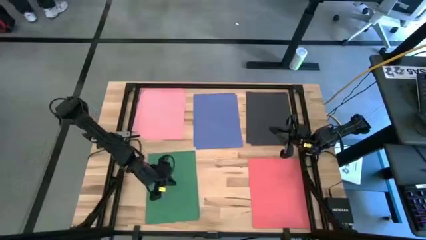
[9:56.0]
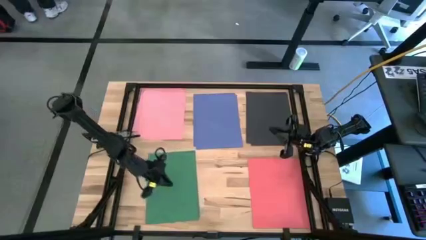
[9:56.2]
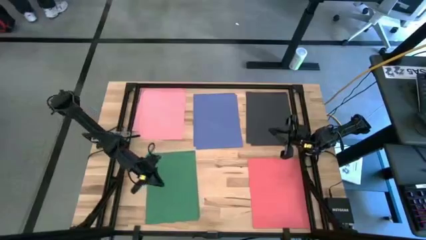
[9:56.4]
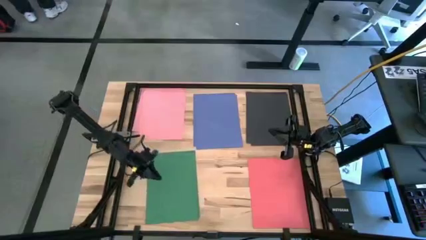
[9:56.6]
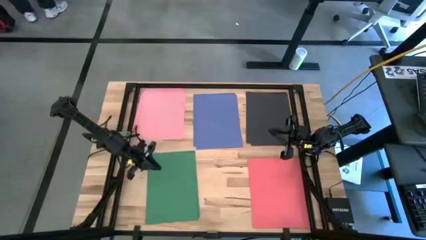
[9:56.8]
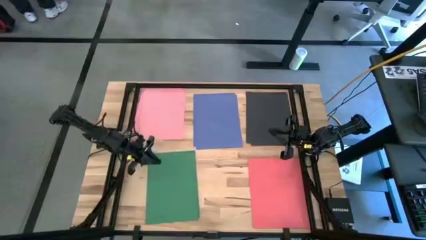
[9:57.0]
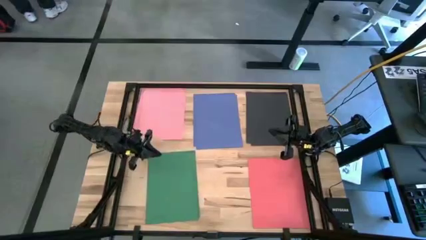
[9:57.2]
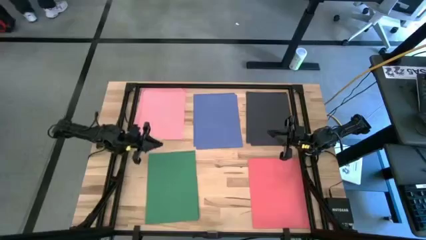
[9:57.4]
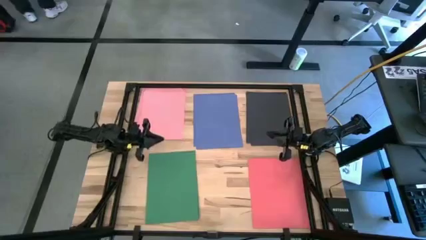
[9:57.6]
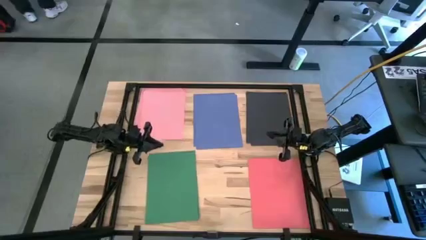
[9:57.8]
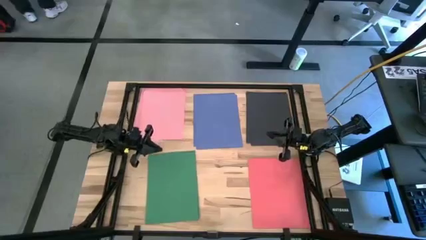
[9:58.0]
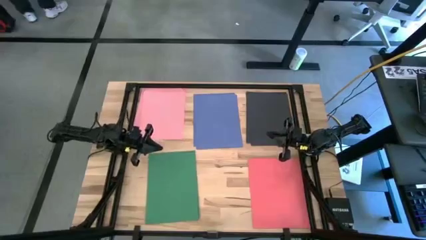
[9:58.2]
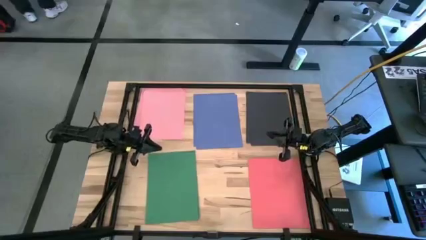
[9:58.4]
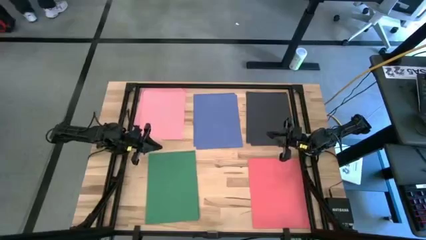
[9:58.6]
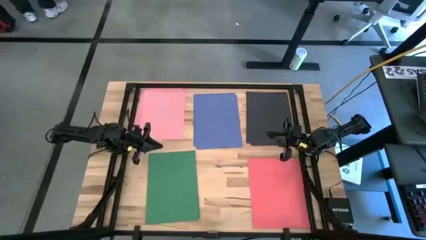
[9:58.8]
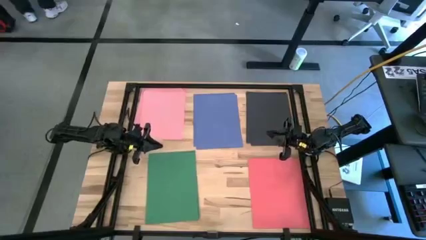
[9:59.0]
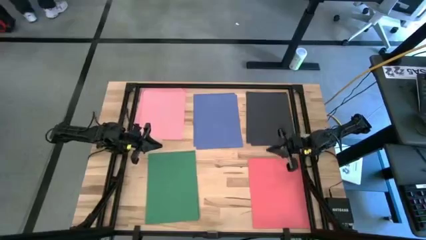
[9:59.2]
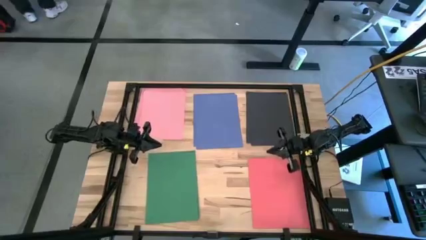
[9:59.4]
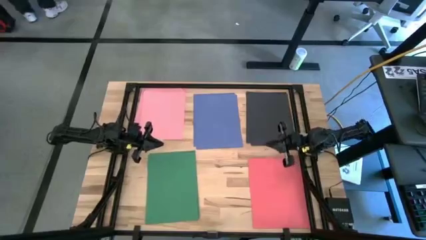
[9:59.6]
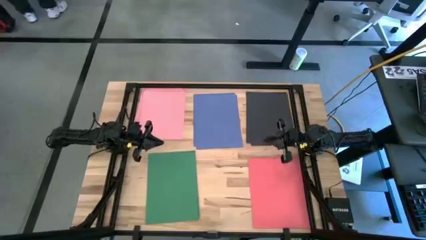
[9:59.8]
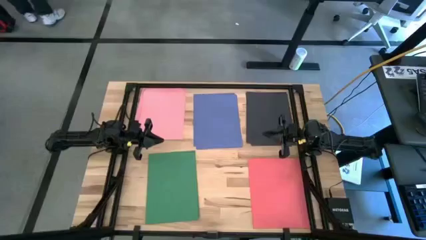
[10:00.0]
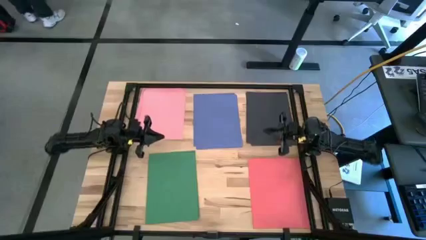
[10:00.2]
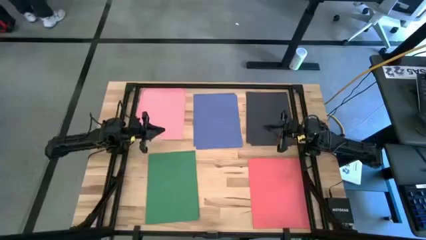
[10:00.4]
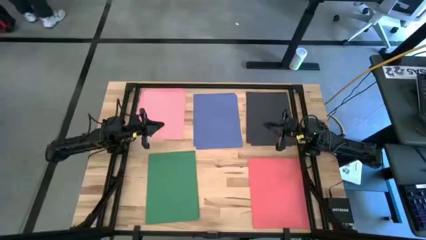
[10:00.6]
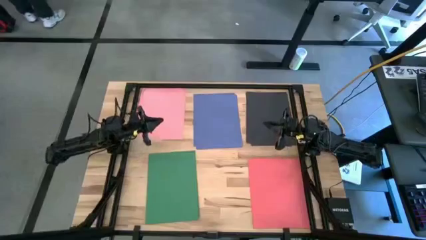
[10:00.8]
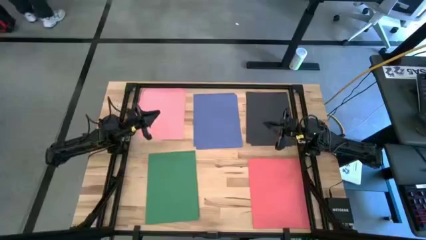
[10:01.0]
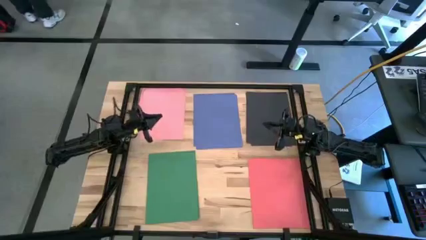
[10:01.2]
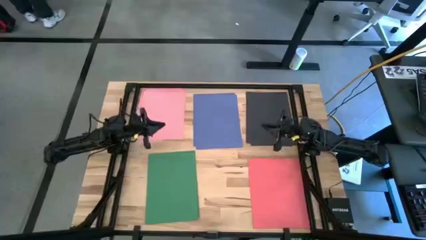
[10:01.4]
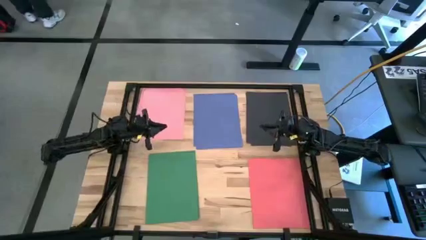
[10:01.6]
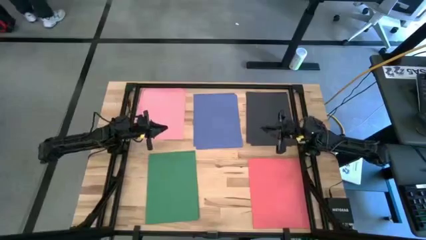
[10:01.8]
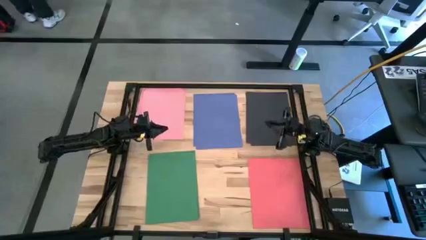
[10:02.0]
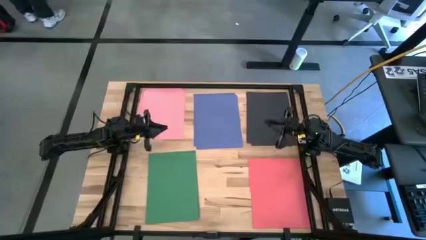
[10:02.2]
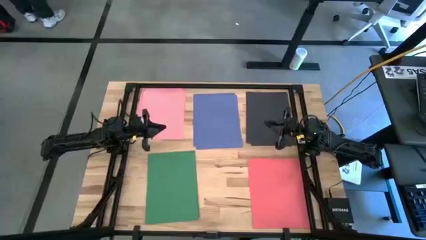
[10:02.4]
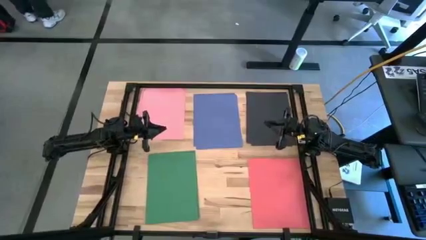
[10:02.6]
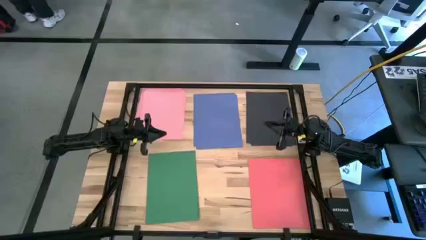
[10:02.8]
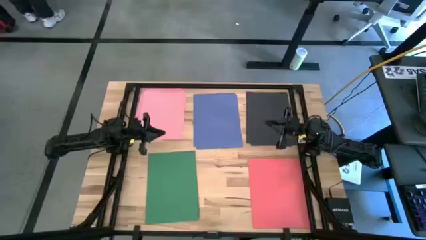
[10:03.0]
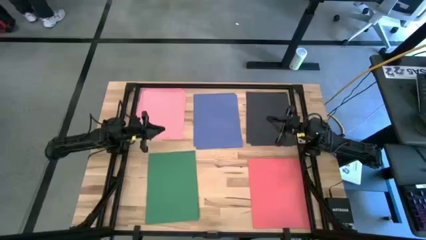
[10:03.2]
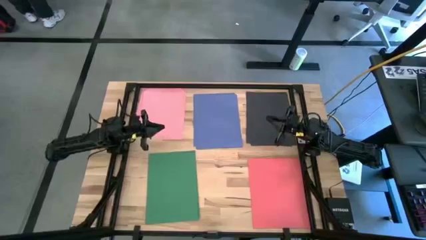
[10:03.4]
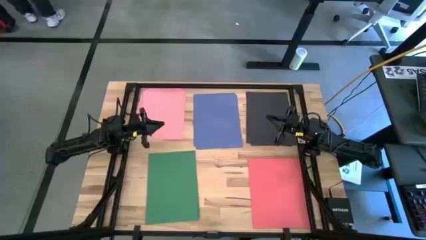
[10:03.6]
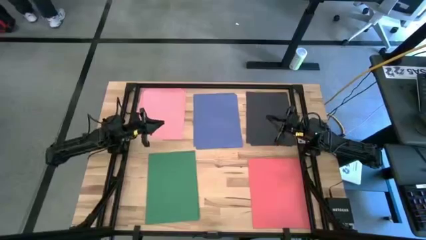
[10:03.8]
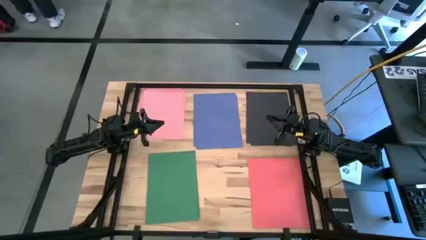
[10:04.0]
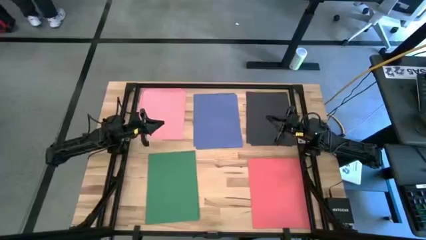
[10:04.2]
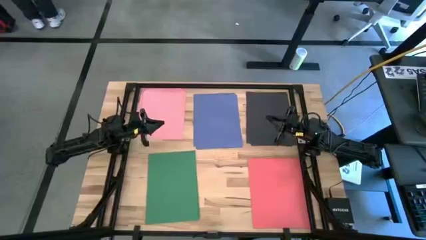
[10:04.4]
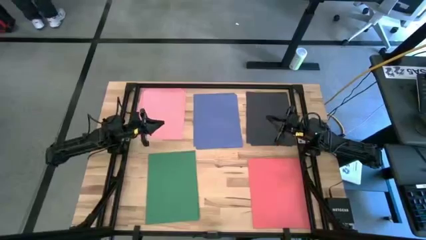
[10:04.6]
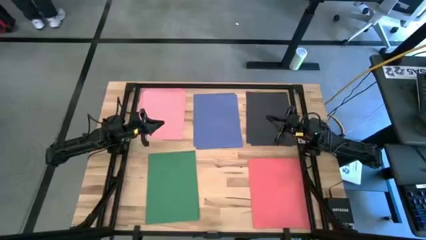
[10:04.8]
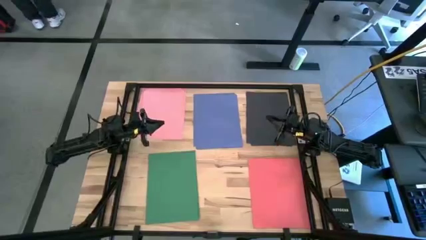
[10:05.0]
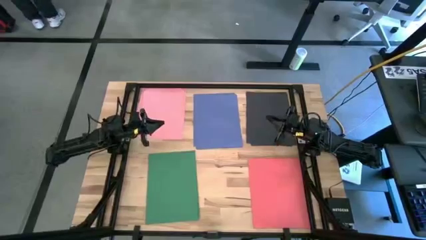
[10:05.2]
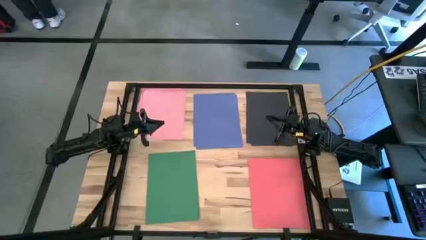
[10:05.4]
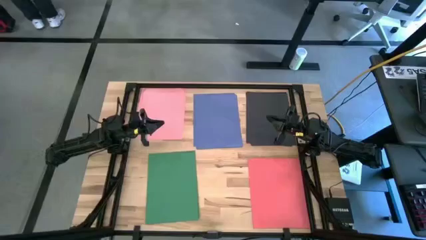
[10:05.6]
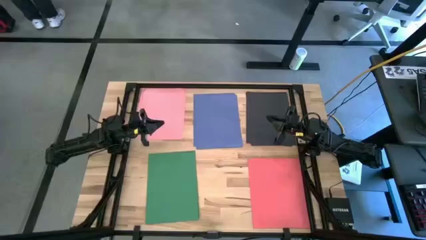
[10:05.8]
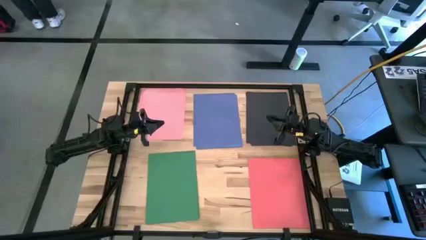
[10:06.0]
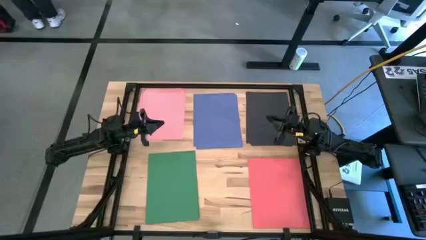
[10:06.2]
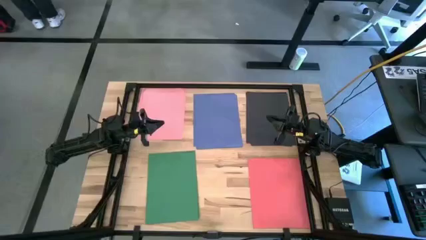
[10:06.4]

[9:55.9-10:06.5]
Task: Organize paper
Return to Home Position

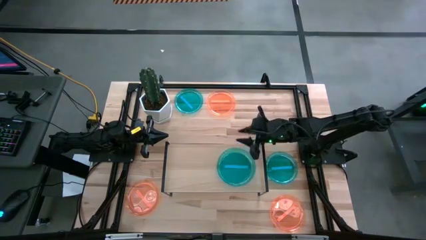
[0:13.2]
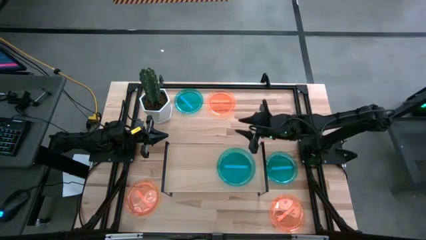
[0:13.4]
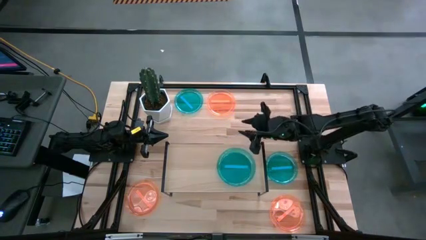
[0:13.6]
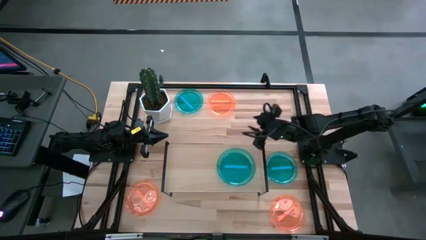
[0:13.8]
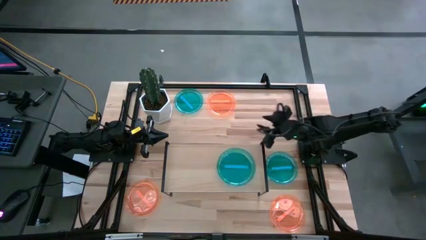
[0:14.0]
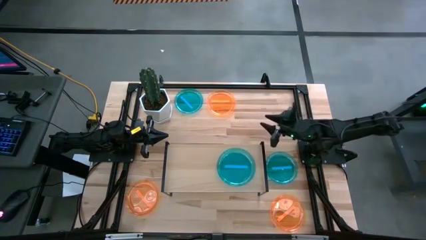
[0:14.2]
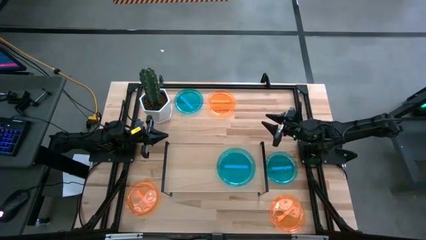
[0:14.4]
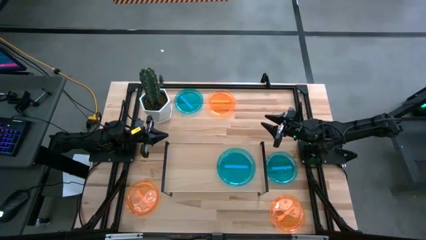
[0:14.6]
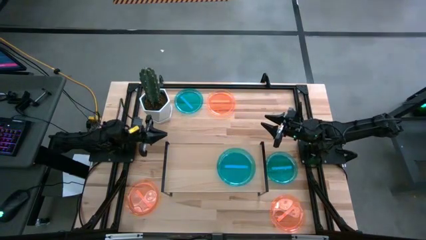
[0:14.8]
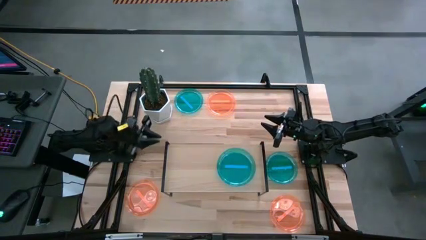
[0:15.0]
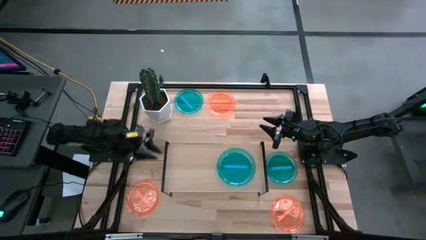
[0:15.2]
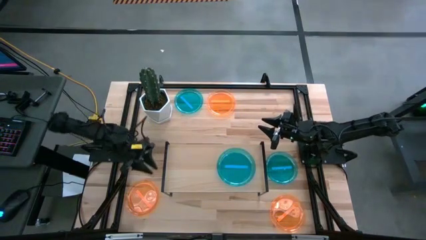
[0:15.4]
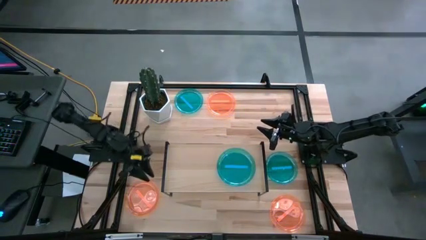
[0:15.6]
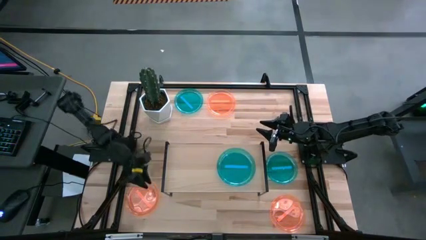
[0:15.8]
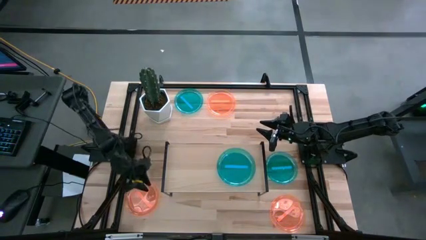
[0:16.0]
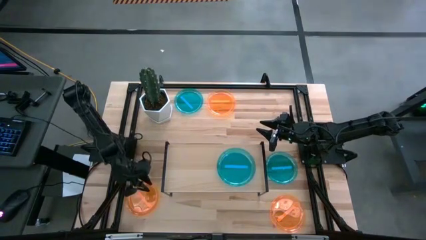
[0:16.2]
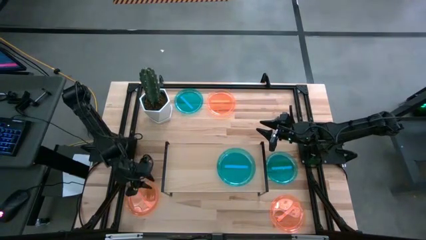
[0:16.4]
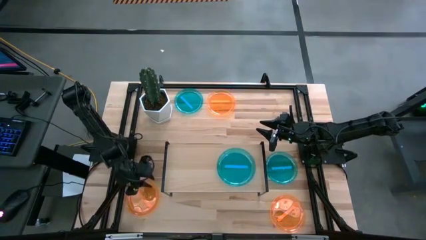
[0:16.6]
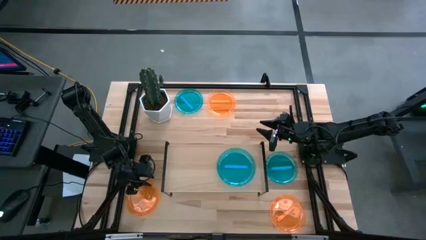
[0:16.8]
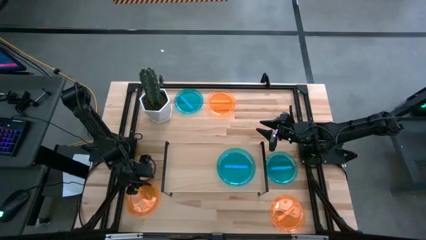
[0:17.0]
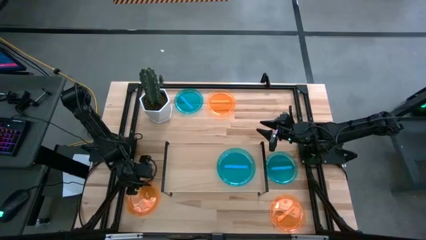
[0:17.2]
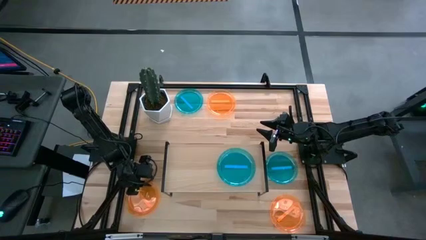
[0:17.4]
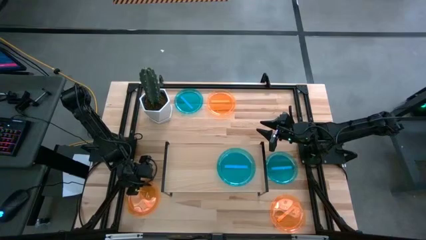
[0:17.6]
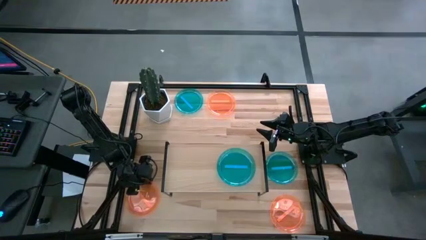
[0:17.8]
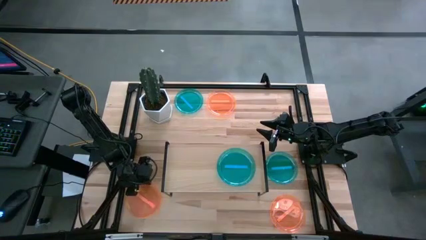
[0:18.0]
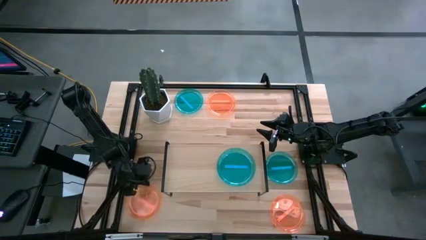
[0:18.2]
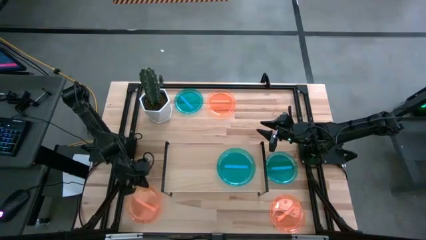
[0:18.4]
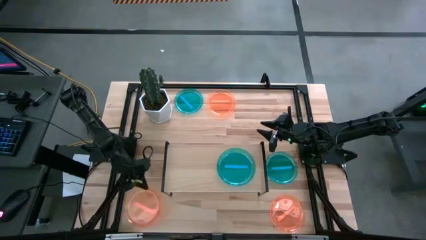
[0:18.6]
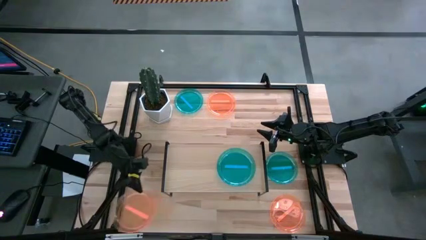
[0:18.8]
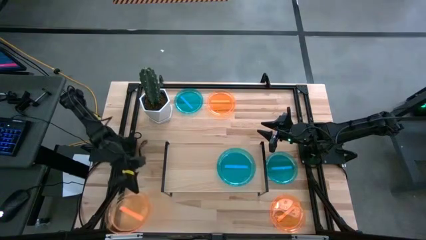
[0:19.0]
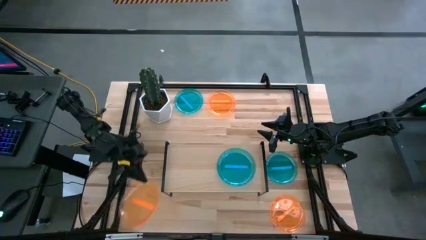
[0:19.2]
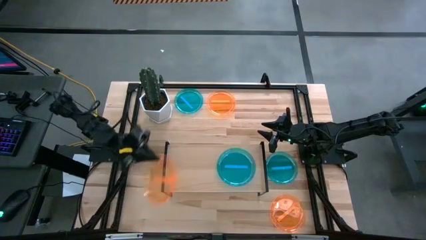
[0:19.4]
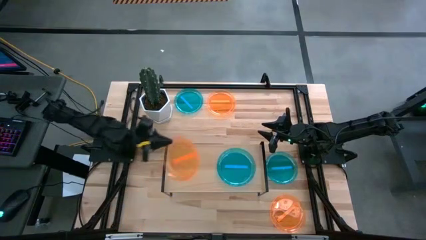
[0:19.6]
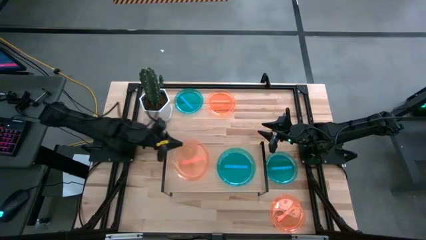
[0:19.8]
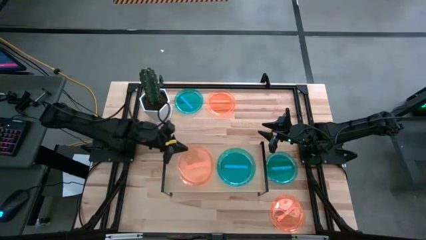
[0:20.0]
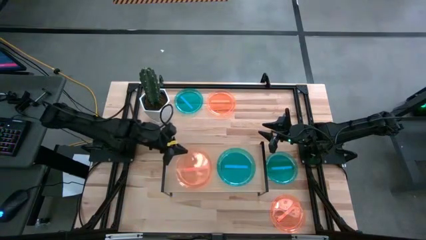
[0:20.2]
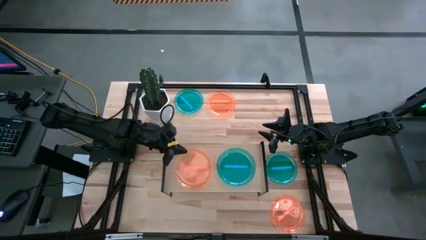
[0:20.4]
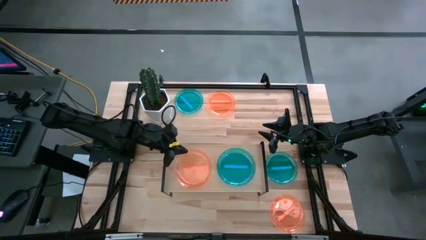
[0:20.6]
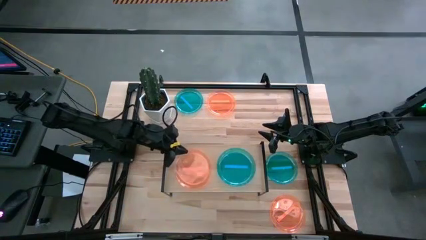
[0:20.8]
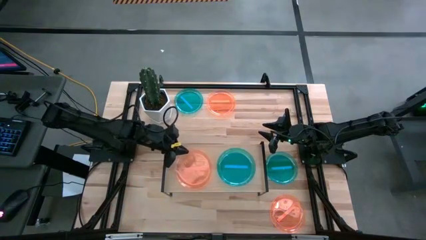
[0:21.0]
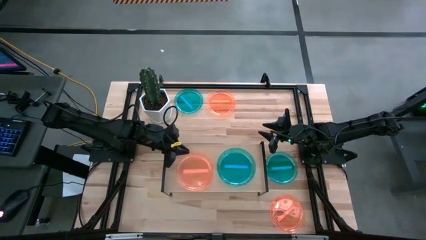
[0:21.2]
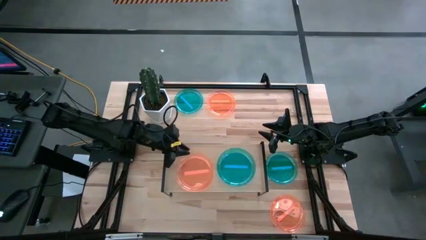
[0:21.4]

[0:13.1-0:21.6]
Task: Place and stack plates onto a shelf
Put the bottom left orange transparent plate on the shelf
